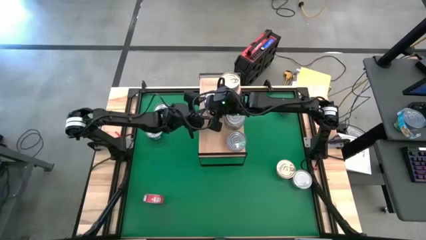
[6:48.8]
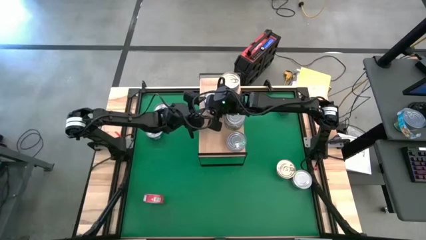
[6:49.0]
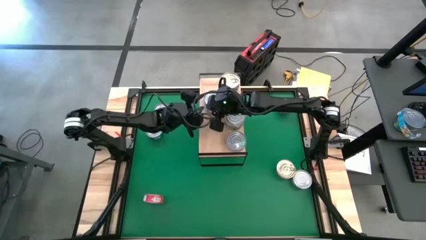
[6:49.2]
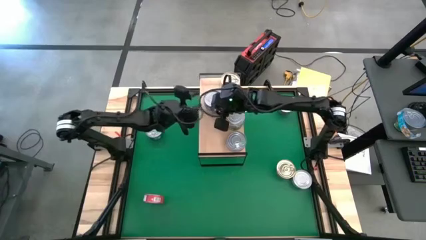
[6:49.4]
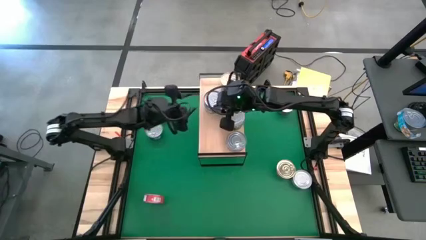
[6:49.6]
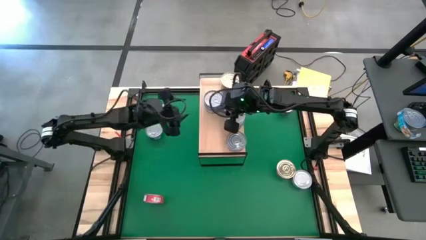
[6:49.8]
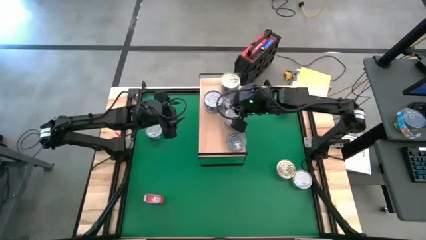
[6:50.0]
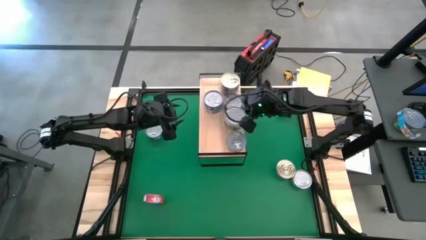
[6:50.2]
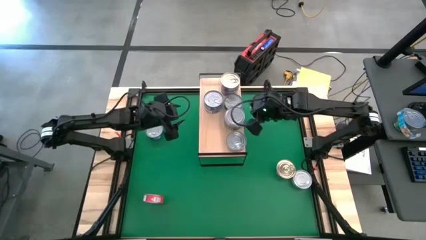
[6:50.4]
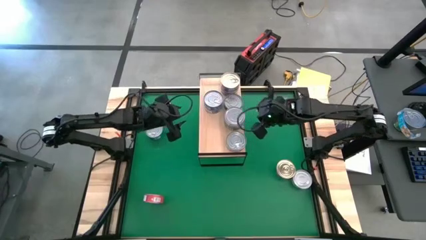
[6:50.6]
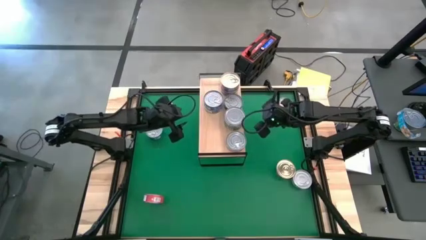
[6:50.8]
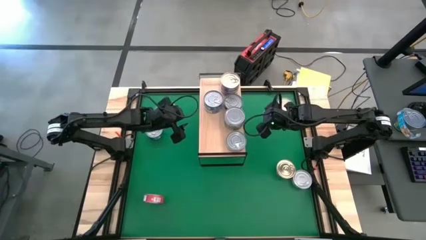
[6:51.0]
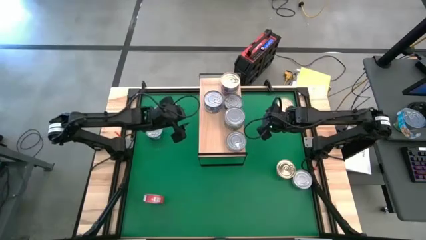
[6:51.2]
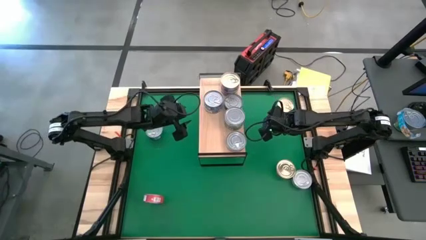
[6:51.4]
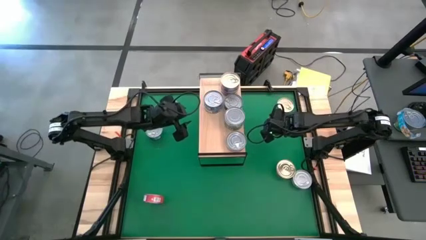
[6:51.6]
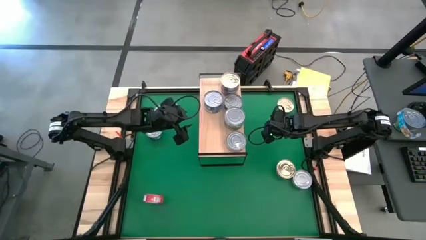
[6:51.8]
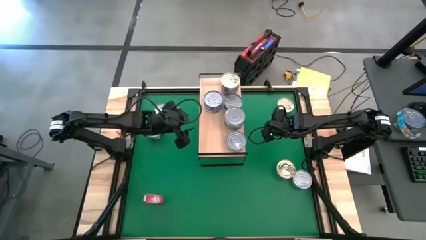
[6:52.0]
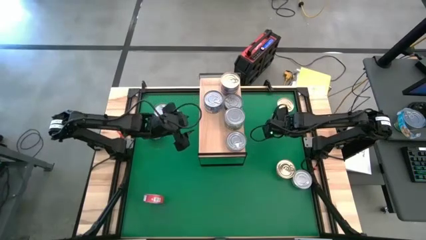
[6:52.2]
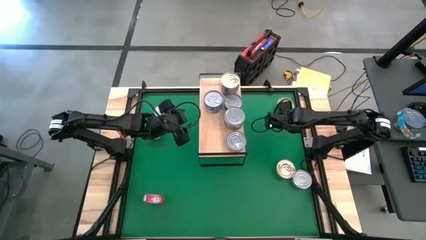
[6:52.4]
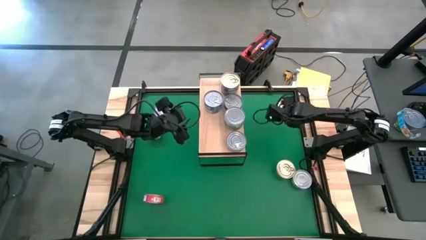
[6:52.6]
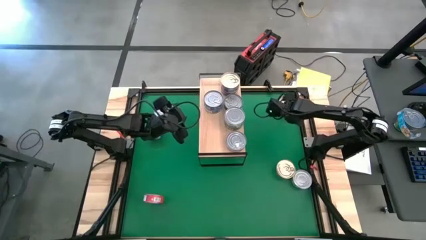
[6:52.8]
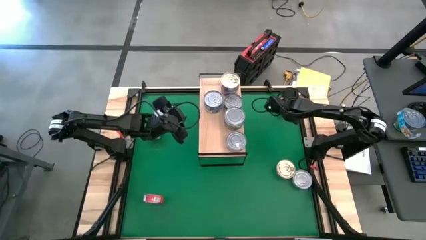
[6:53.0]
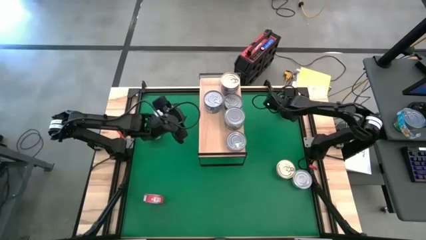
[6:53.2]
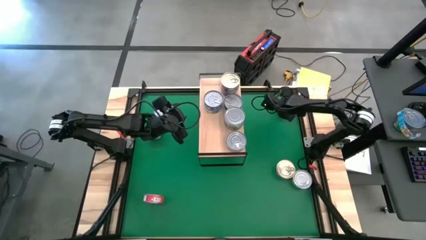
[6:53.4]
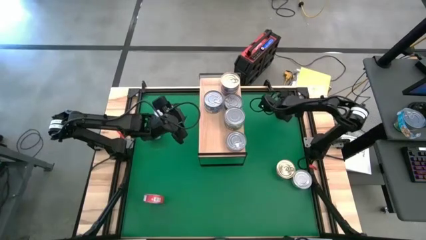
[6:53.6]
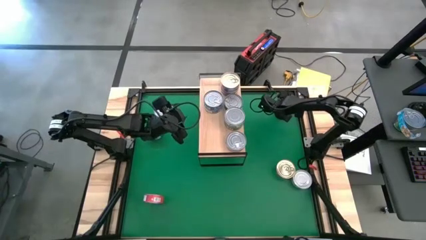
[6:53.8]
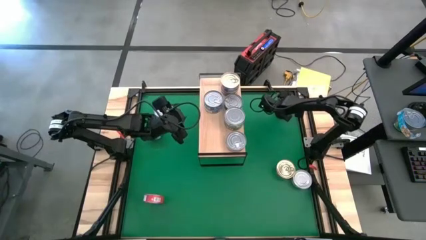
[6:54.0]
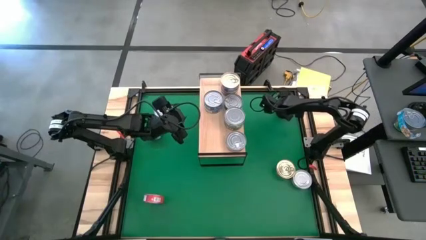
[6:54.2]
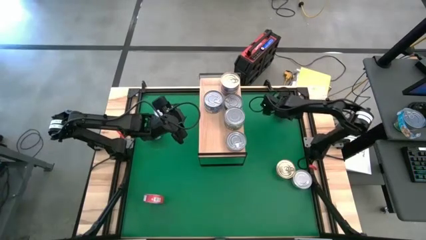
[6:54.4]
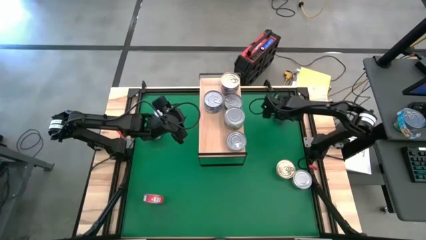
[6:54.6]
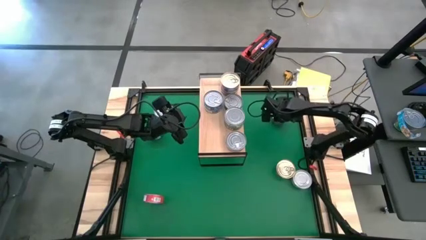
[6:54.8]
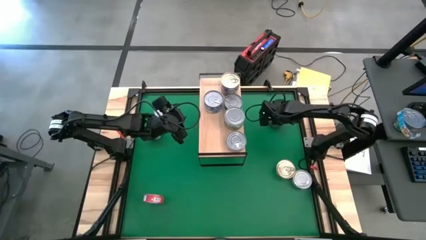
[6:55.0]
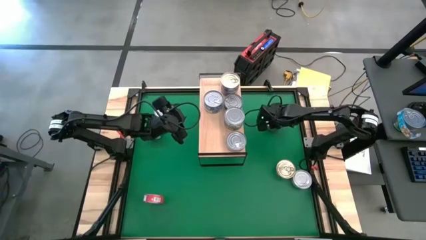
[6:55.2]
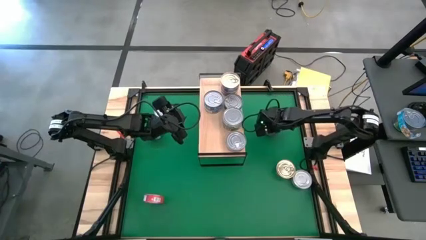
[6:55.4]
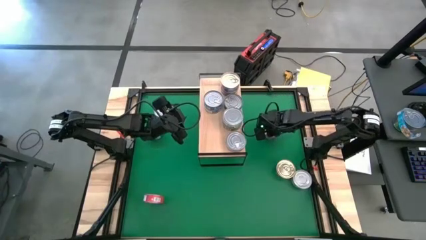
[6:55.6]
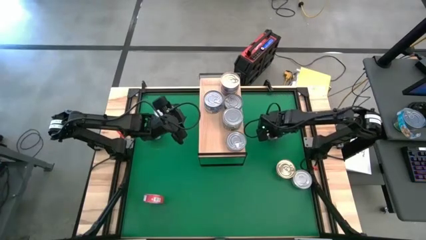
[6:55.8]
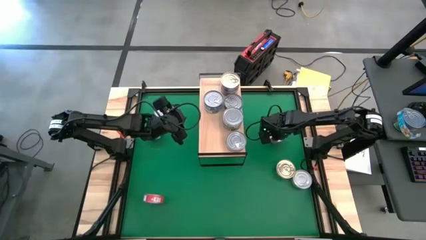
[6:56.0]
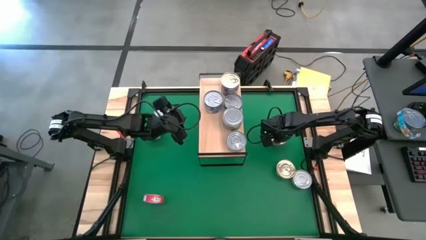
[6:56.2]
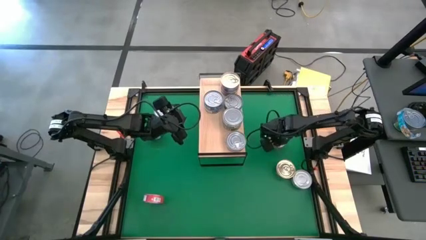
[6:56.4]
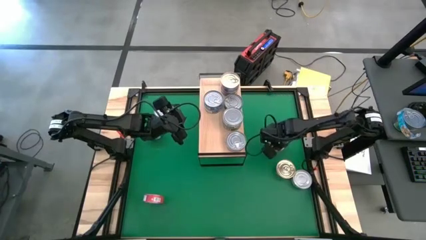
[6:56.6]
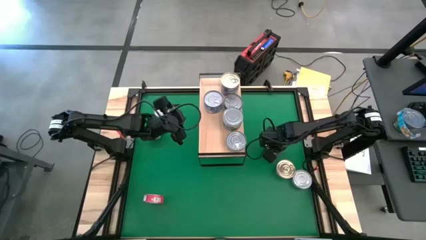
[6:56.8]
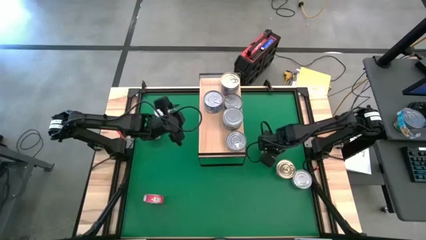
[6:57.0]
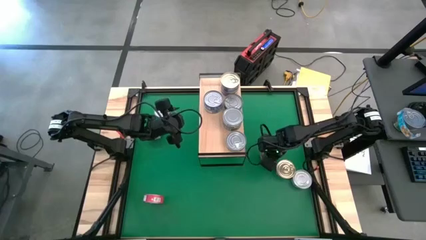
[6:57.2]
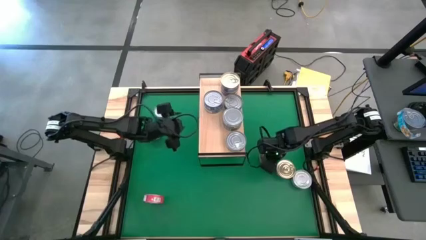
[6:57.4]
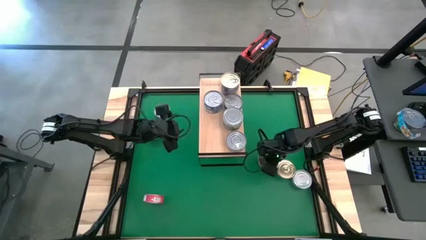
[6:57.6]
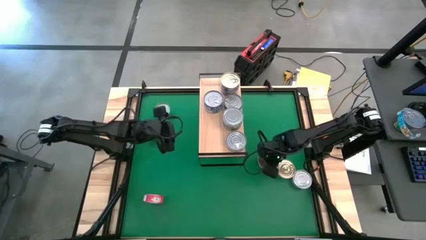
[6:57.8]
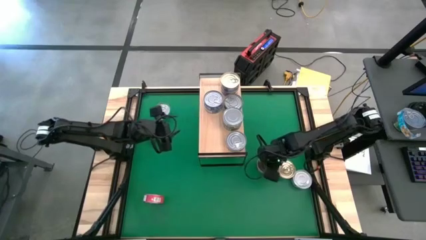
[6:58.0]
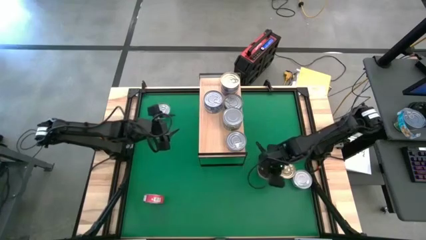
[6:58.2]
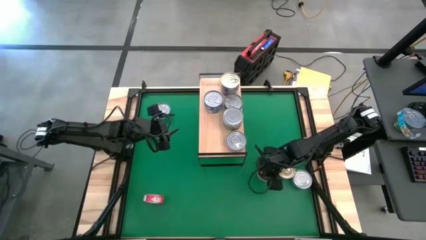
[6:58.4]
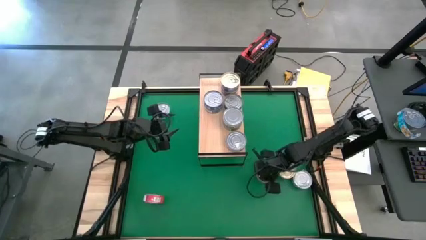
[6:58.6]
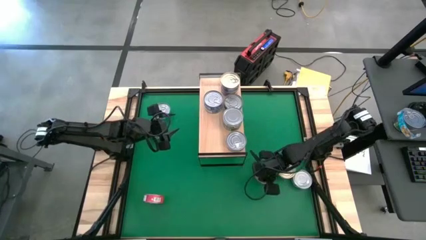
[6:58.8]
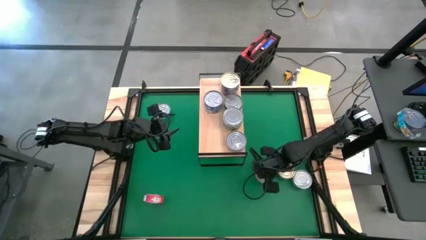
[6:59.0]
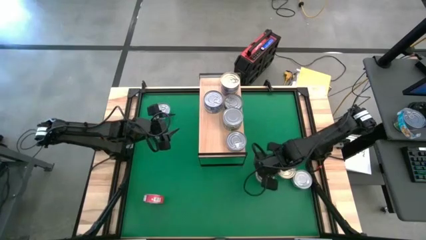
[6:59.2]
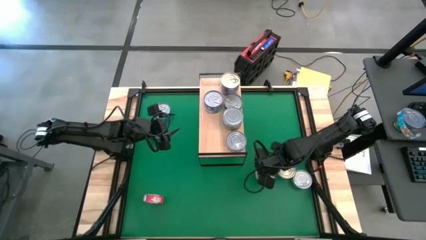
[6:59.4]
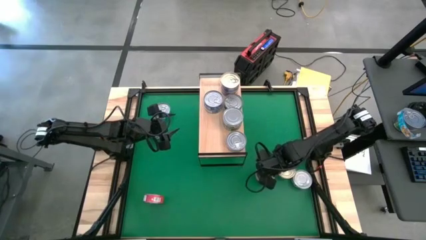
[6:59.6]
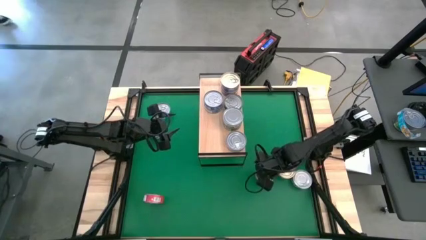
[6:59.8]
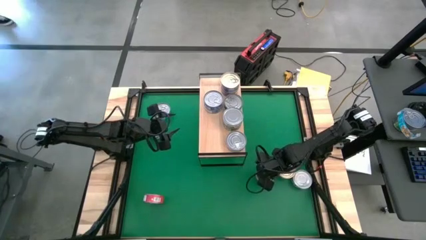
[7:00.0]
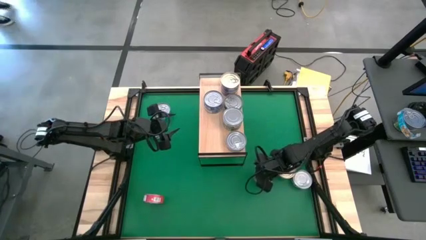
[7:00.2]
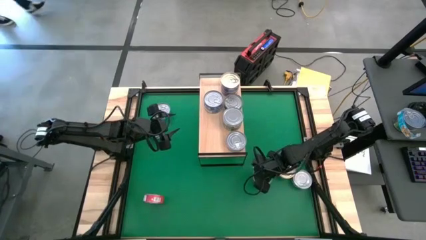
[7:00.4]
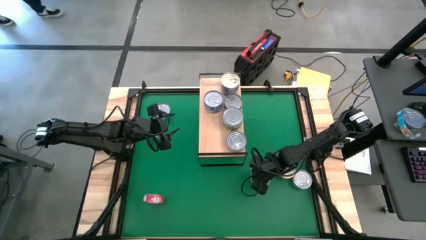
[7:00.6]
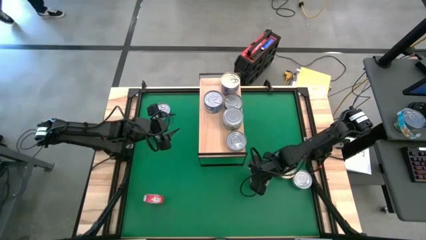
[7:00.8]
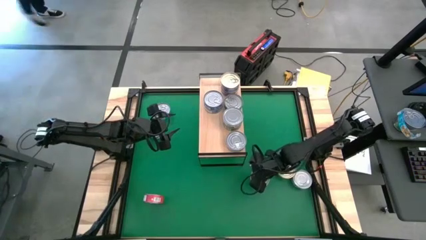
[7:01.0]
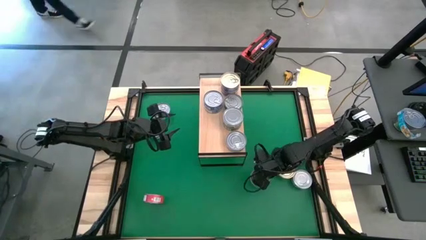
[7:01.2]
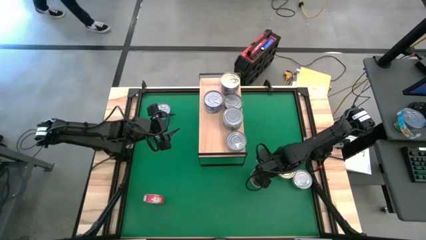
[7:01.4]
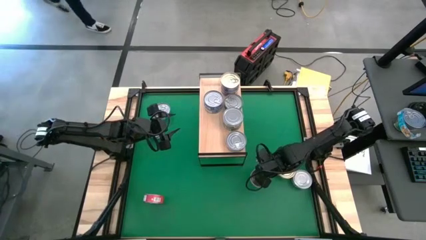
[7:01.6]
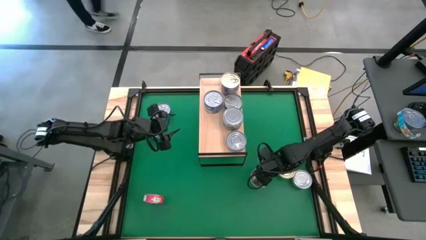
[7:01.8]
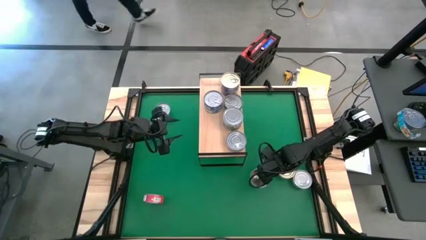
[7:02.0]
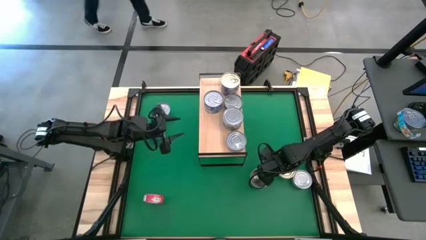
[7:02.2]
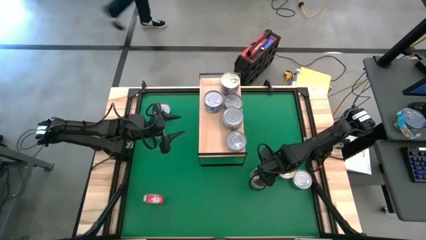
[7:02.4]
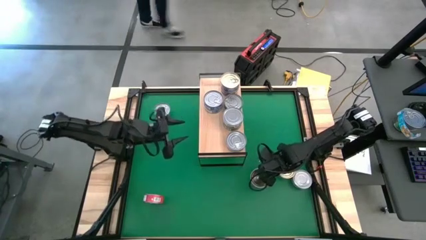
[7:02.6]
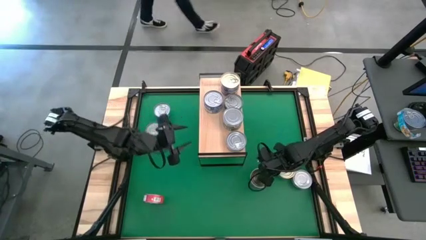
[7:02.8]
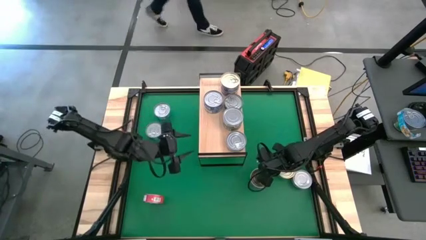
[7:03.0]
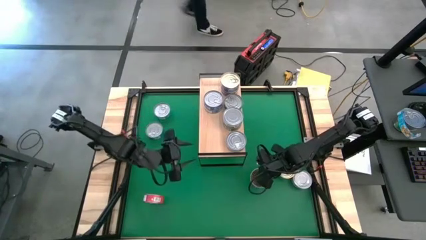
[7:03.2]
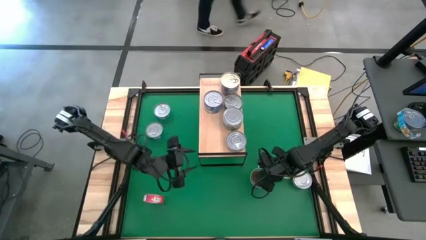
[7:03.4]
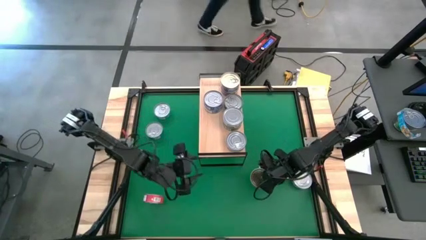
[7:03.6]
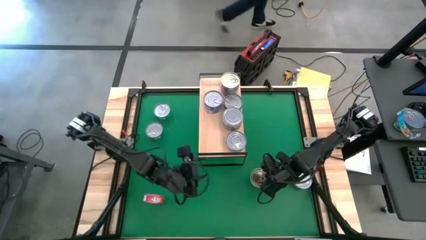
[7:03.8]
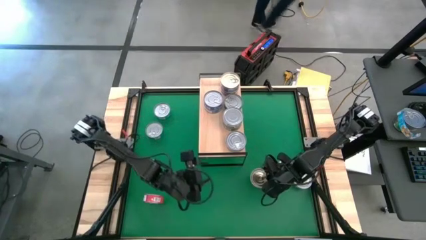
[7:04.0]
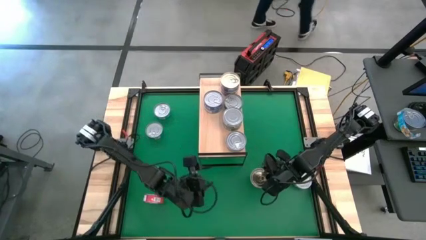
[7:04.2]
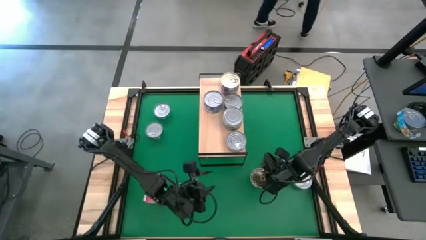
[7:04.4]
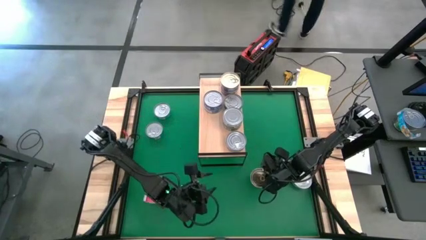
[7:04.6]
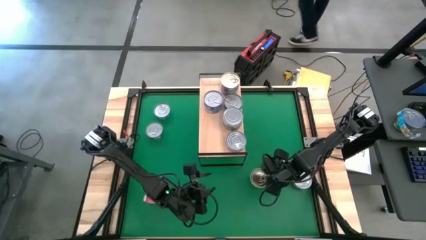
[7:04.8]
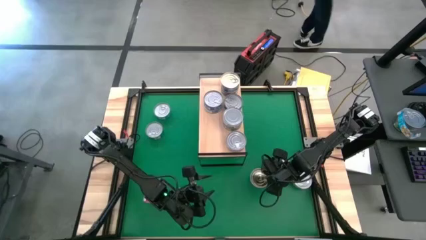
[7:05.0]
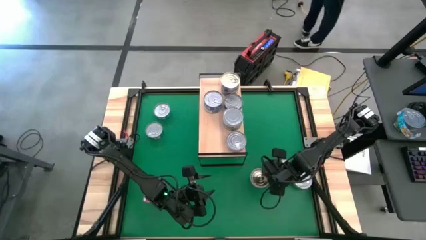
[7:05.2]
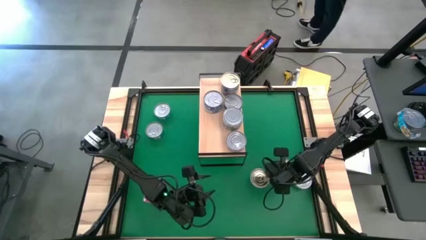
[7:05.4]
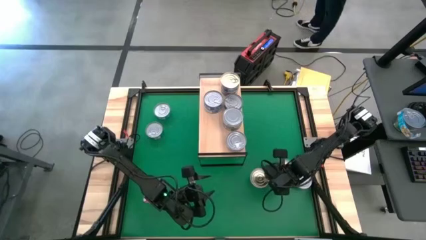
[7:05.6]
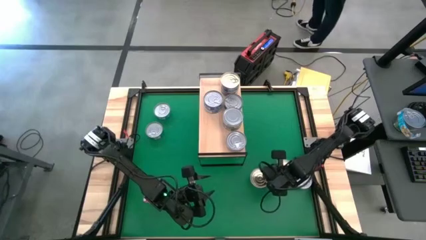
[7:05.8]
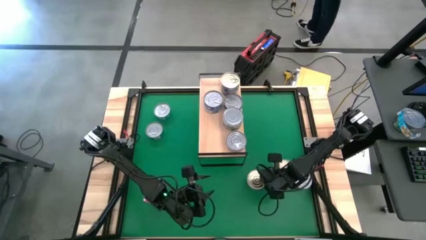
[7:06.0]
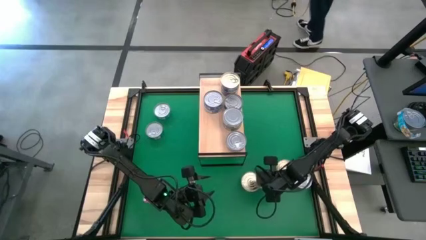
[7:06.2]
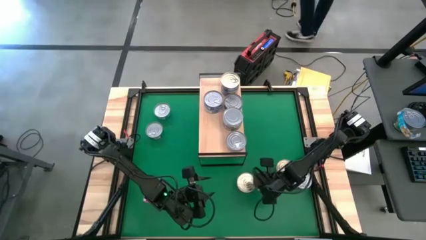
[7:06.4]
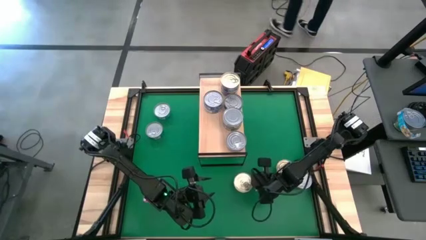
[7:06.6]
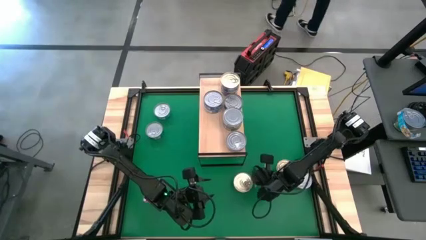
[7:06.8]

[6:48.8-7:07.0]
Task: Stack canned seafood by type on shelf
Stack the top dark blue tuna can on top of the dark blue can on the shelf
